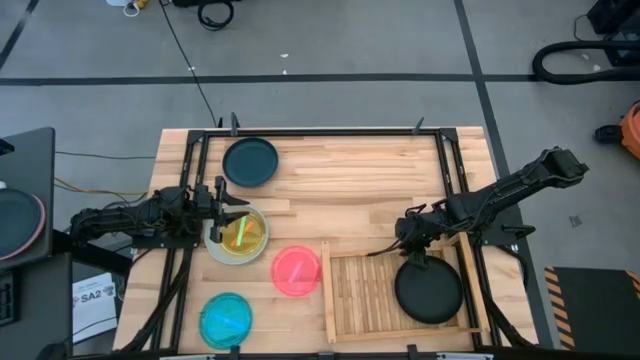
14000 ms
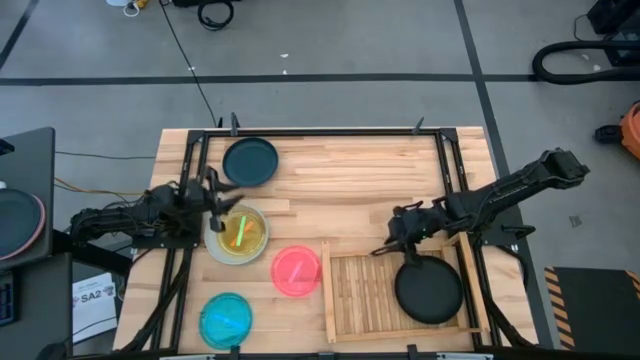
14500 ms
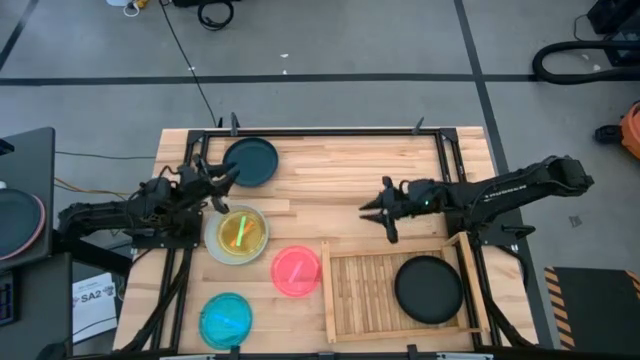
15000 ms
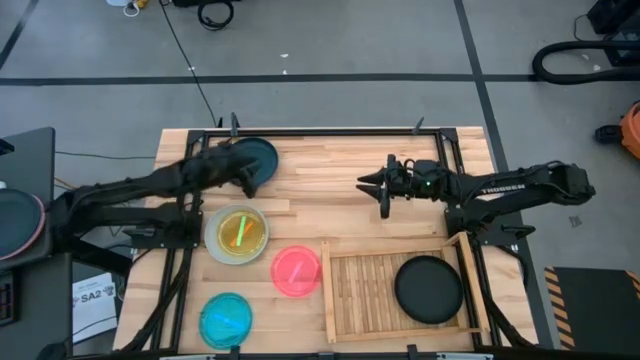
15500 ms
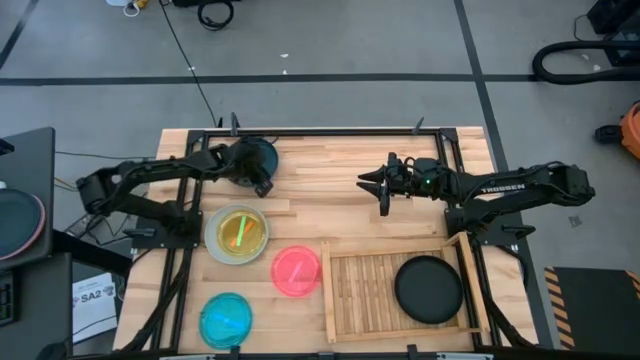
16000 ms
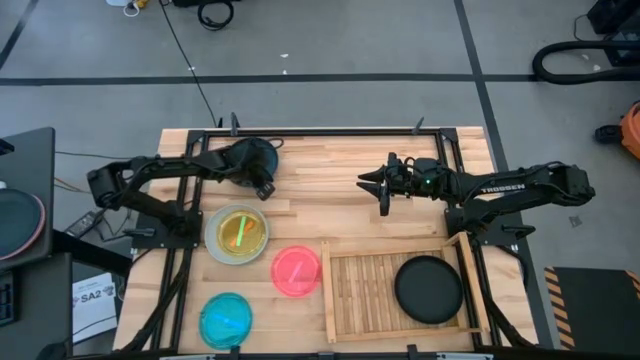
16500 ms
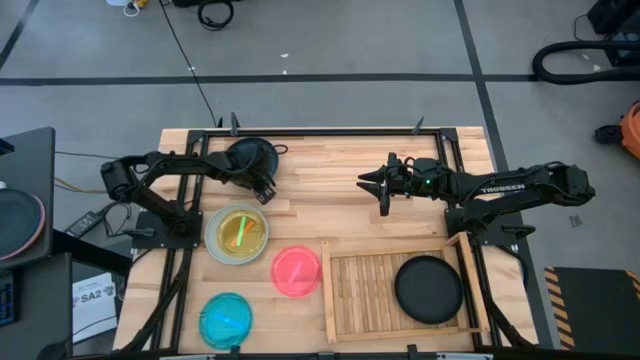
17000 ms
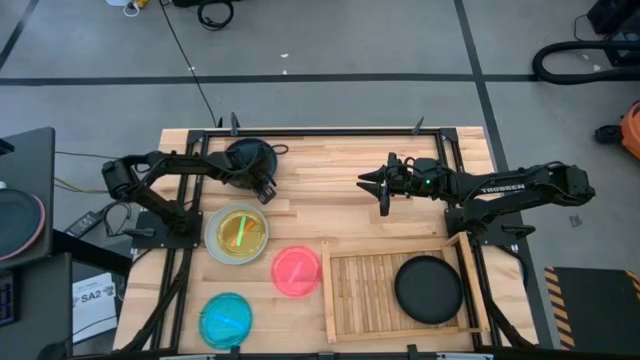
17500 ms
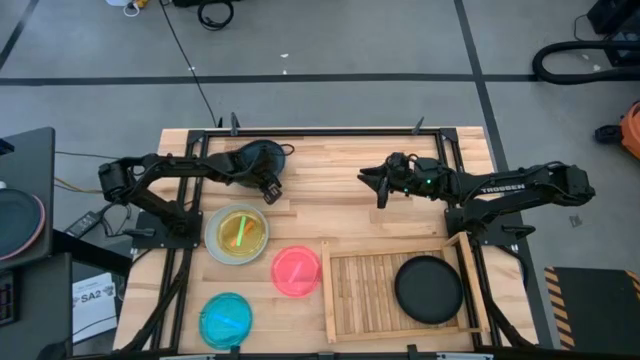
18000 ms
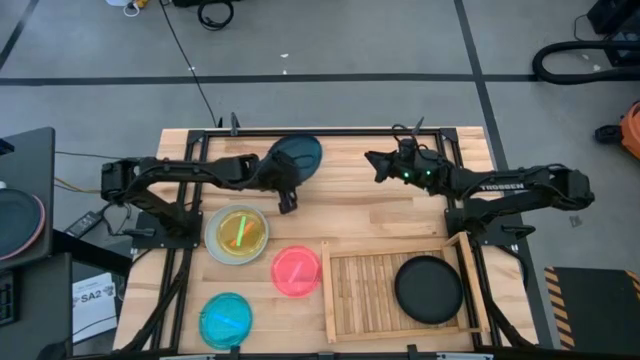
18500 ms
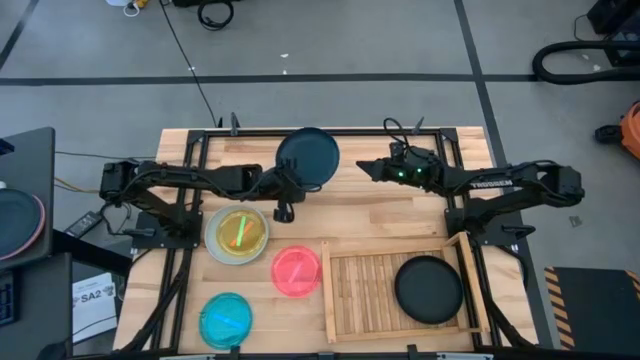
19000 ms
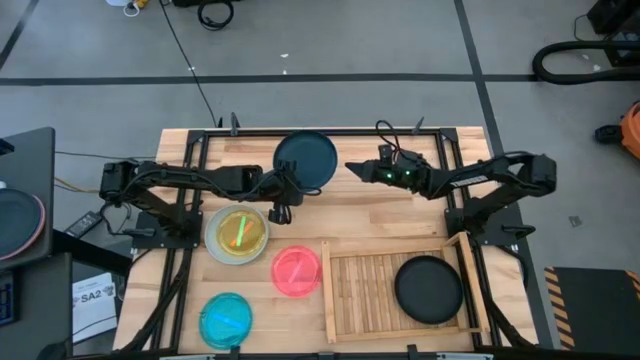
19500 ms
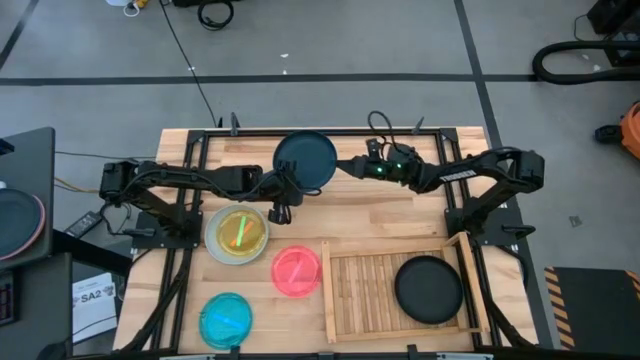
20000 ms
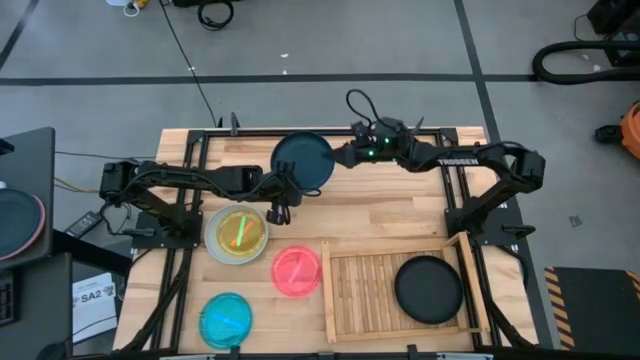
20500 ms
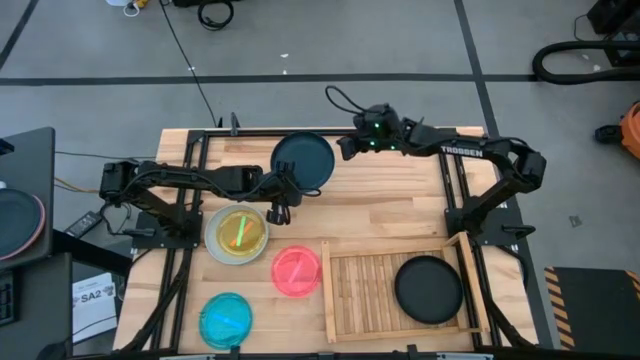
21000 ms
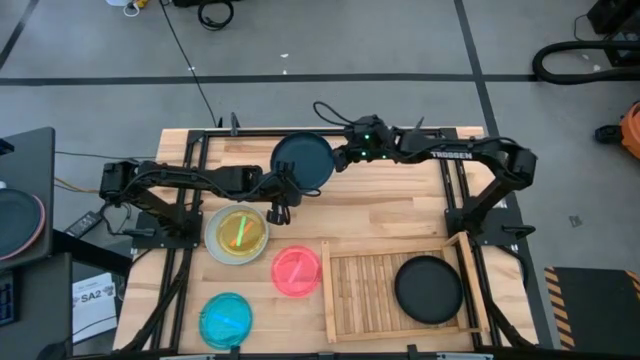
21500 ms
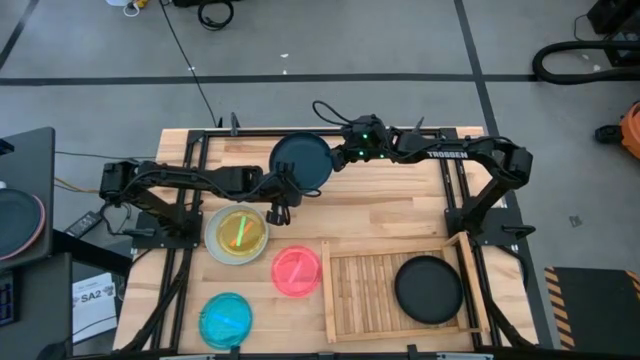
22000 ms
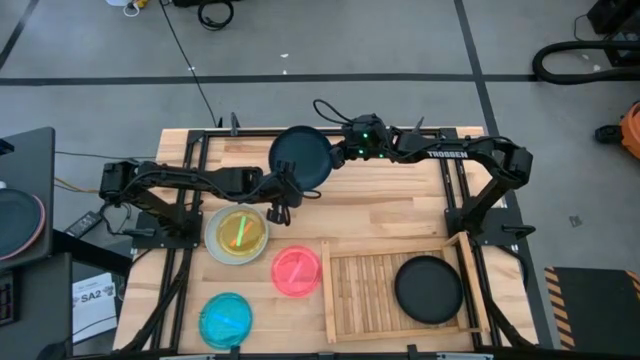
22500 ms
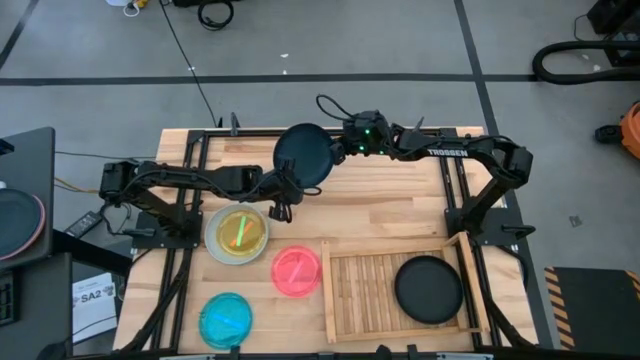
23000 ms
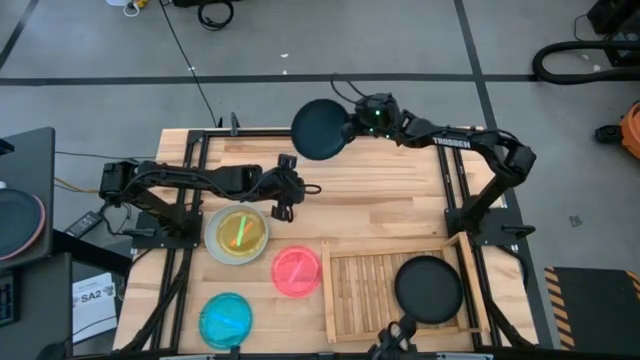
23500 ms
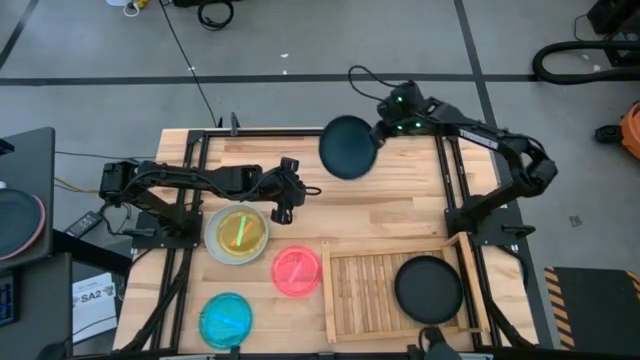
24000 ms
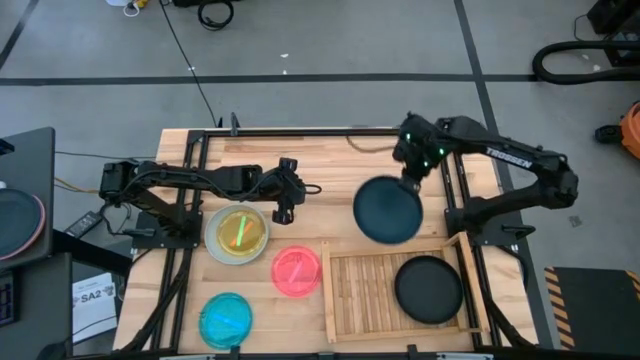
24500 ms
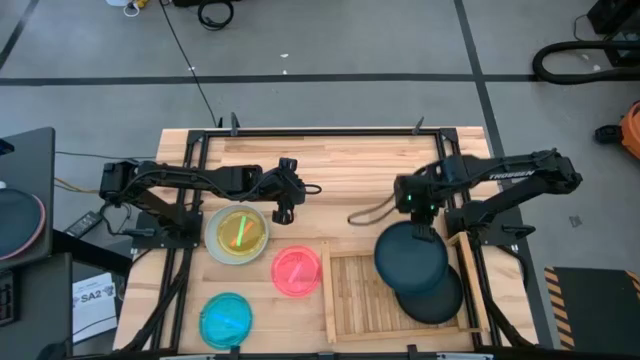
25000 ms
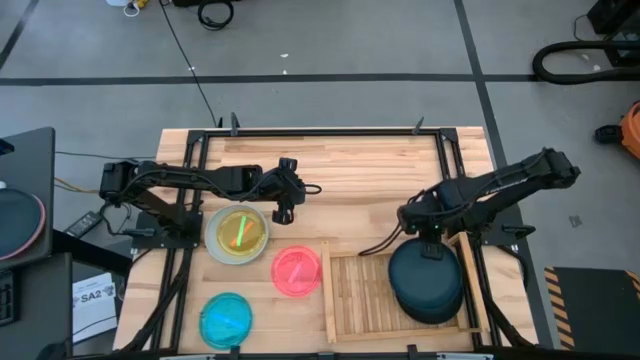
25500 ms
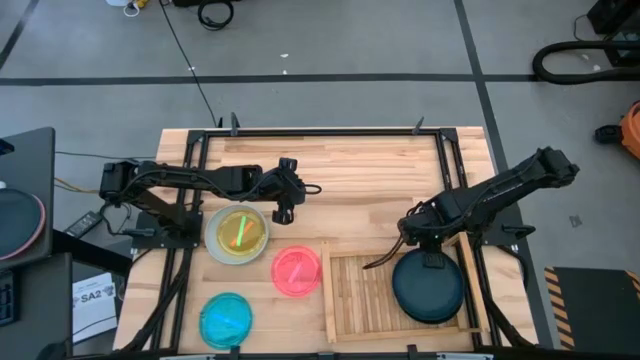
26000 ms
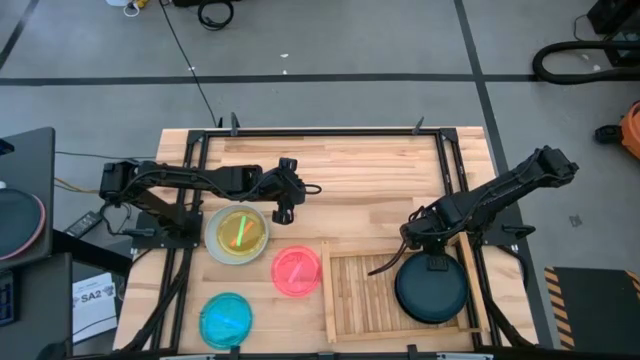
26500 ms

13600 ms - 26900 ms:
Task: Place and stack plates onto a shelf
Stack the dark blue plate on the black plate on the shelf

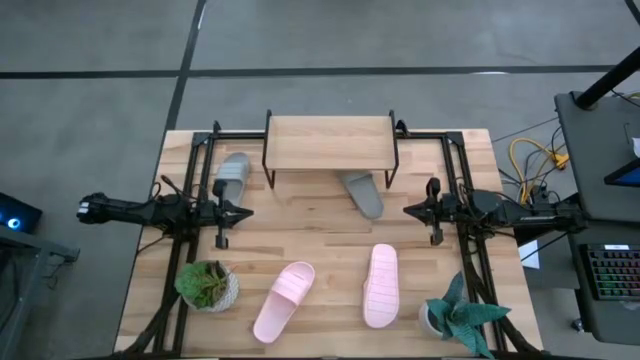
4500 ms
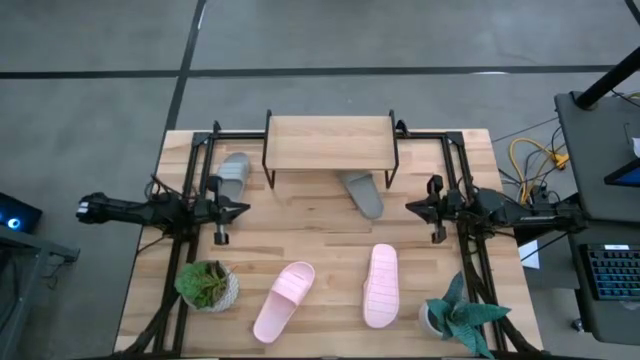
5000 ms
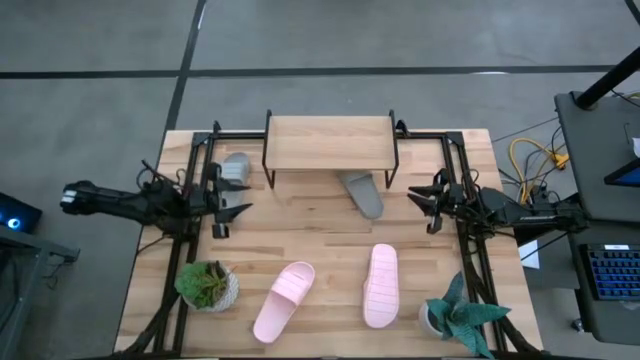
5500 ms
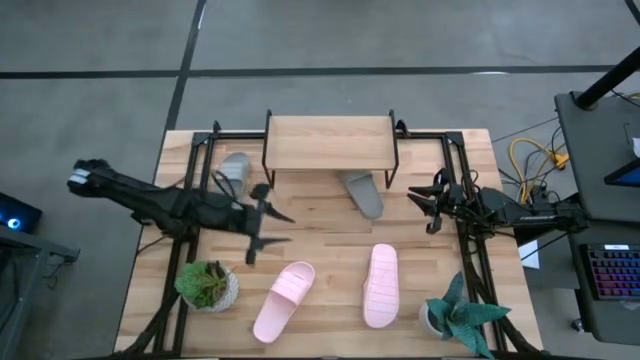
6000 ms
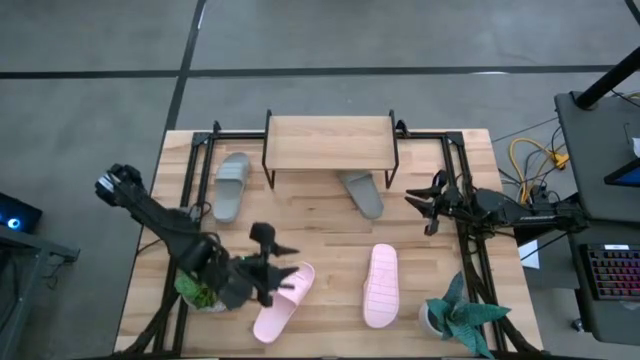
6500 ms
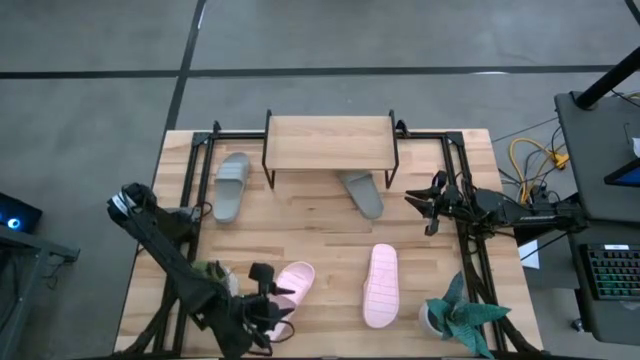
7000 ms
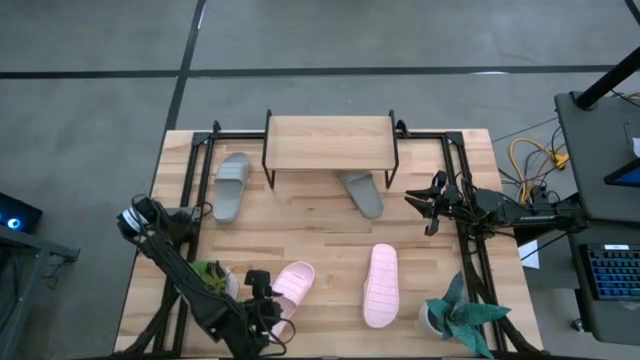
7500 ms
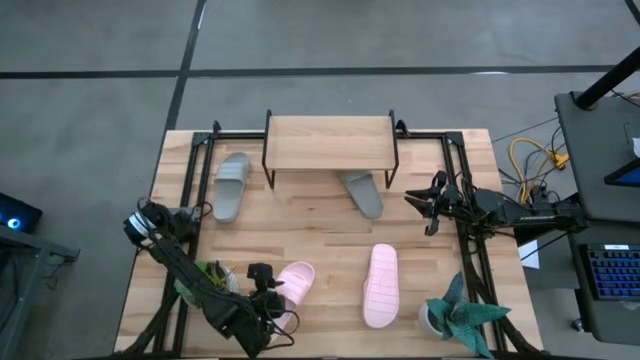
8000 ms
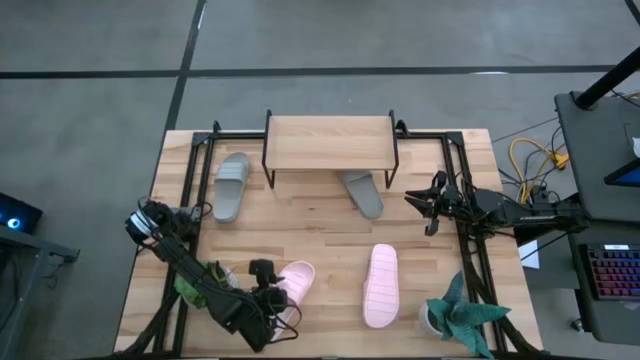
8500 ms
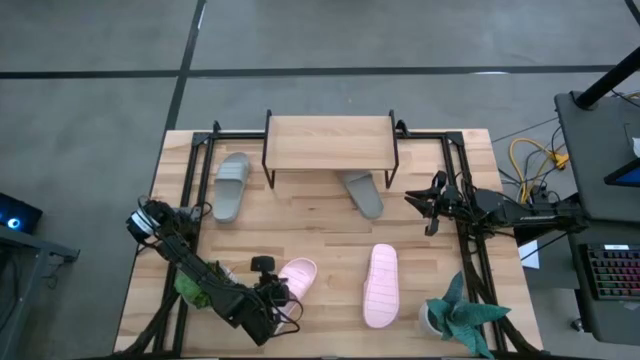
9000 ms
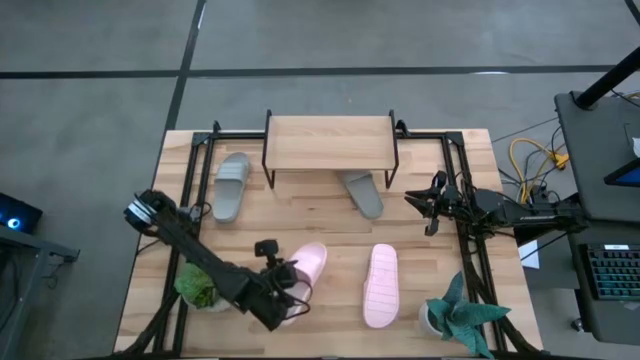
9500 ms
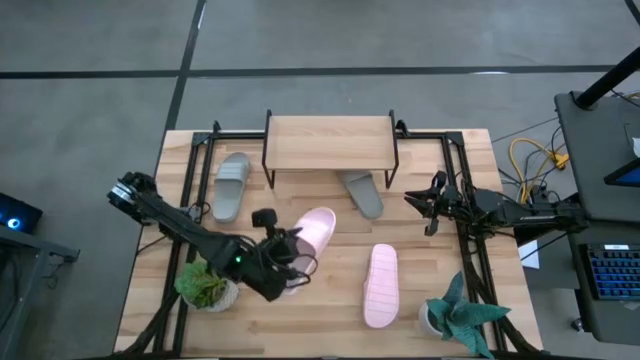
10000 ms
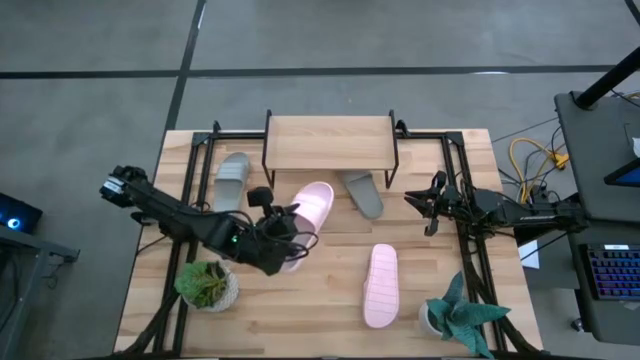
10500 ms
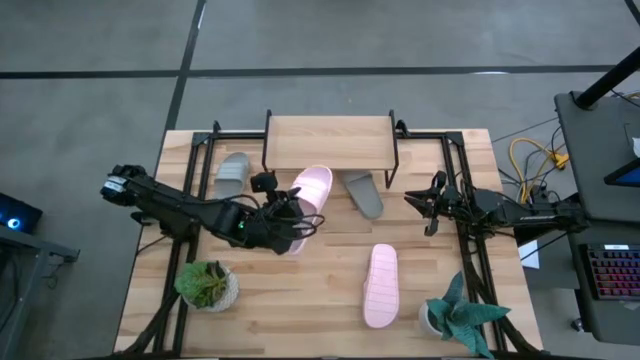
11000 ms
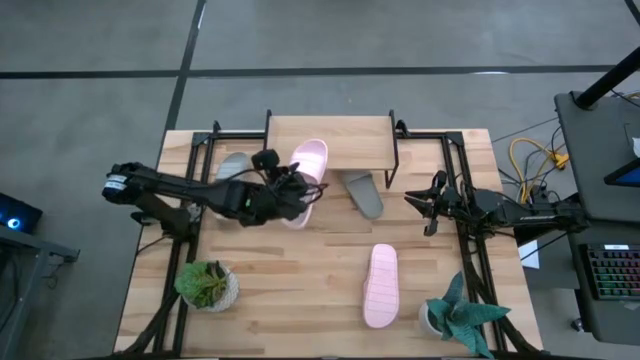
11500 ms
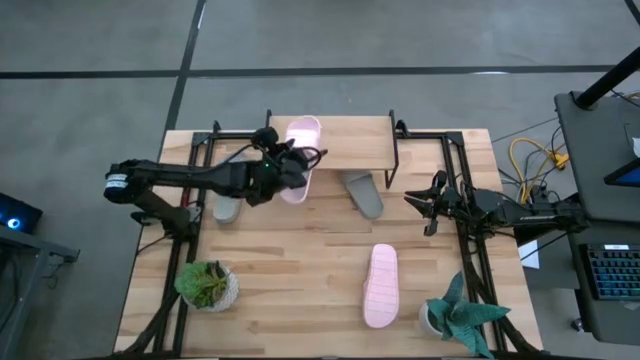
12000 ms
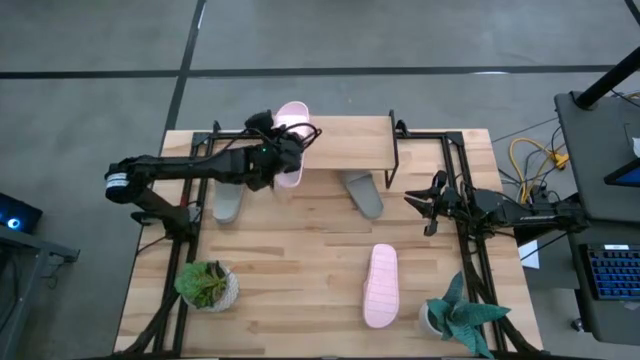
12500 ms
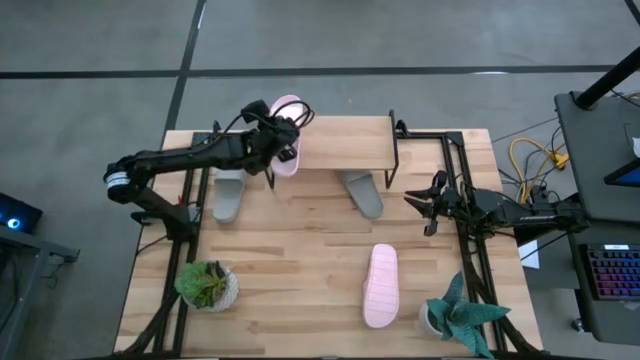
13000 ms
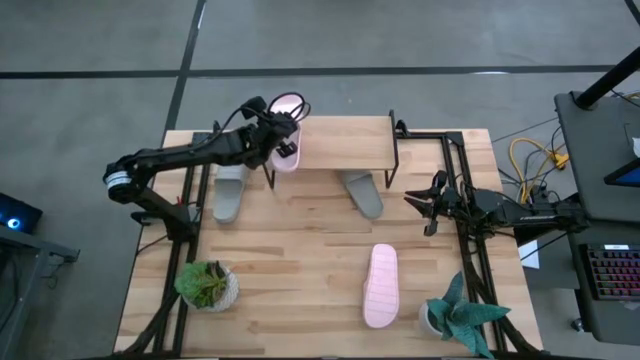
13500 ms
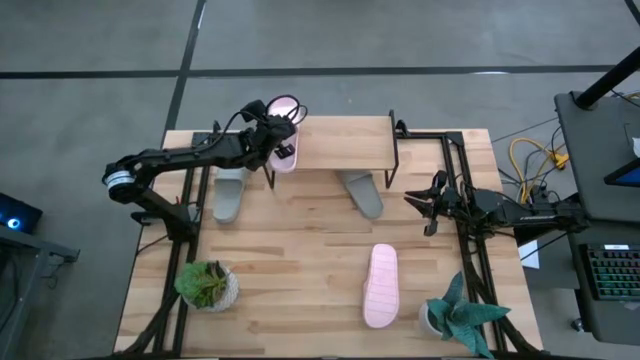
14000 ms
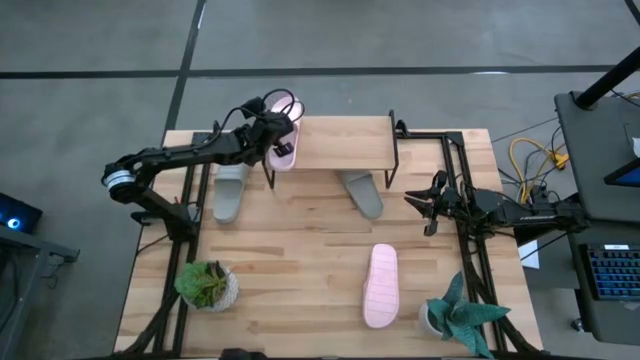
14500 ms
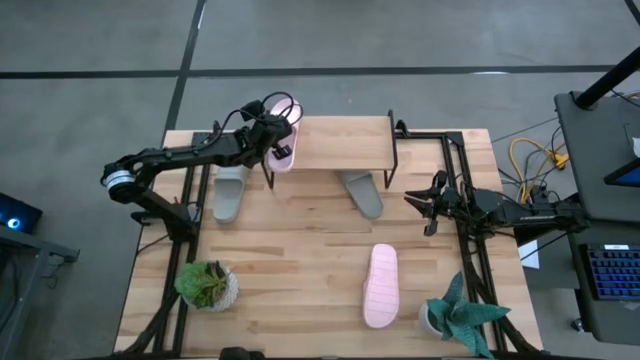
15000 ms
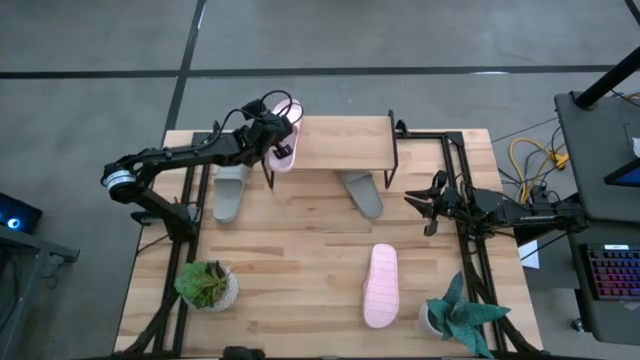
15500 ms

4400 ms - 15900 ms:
Task: Pick and place slides into the shelf
Put the left pink slides on the shelf
